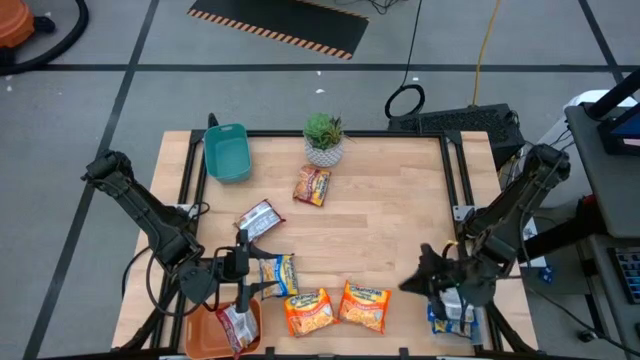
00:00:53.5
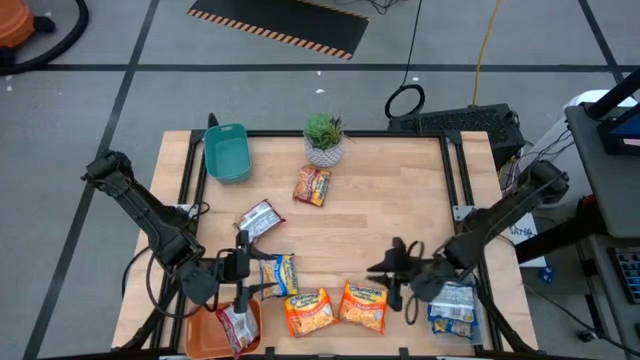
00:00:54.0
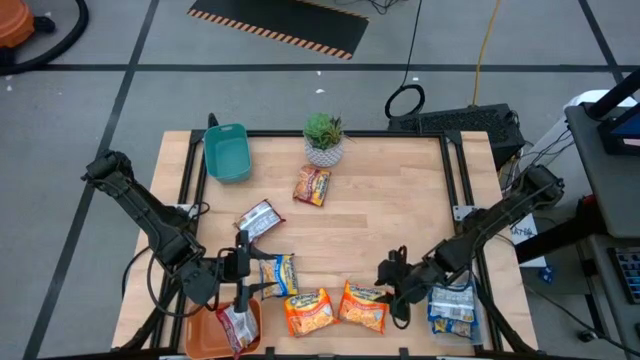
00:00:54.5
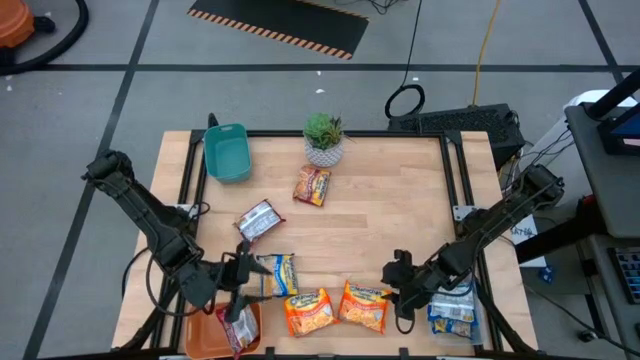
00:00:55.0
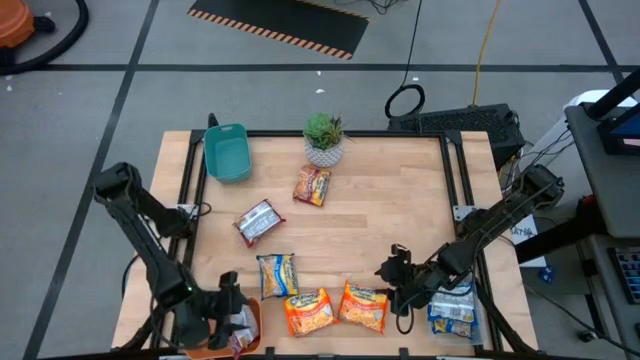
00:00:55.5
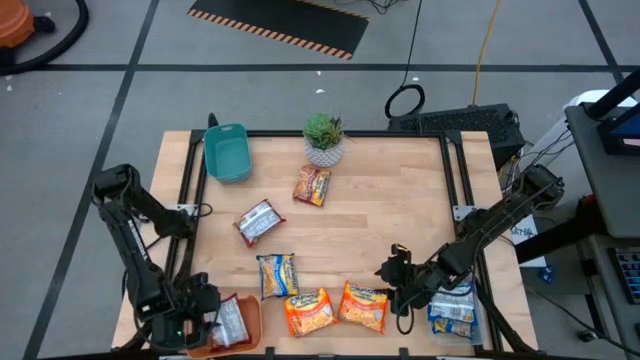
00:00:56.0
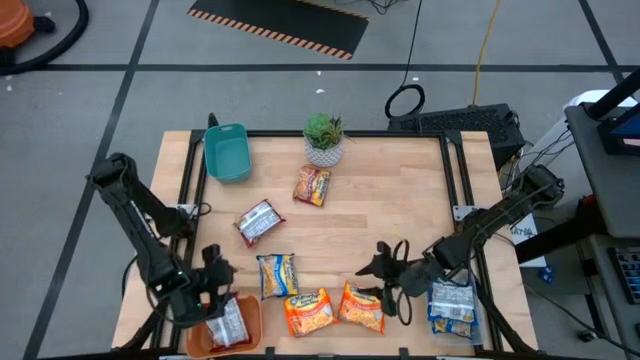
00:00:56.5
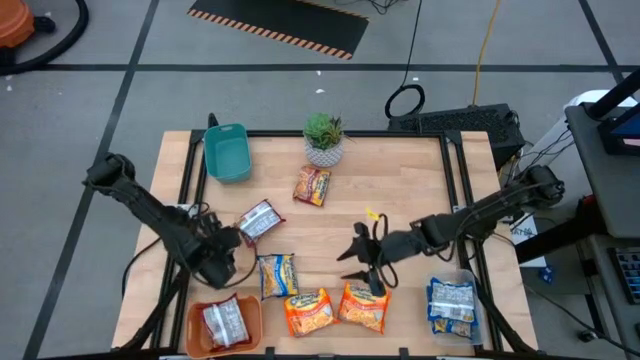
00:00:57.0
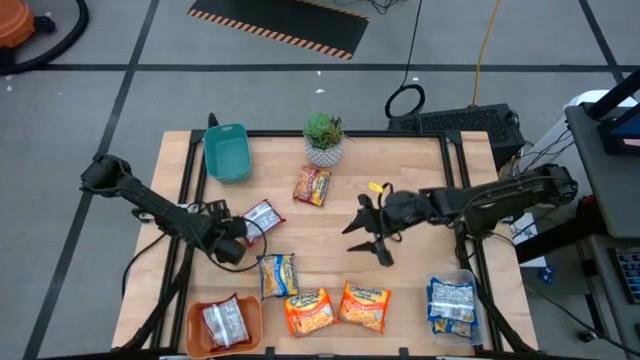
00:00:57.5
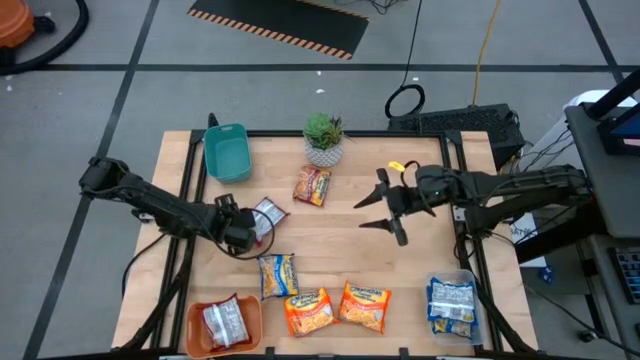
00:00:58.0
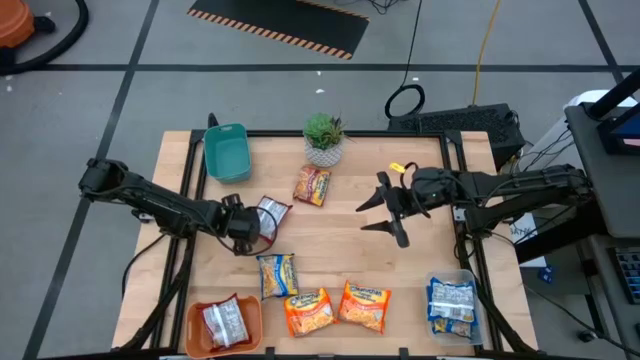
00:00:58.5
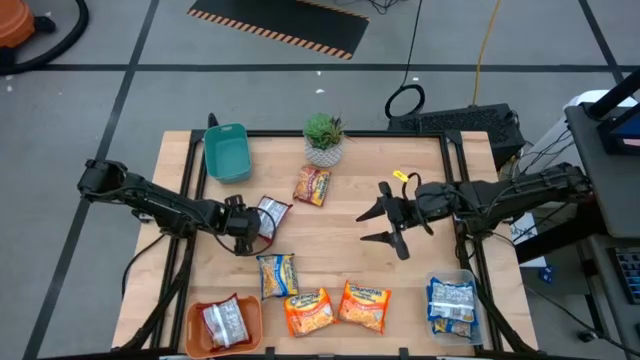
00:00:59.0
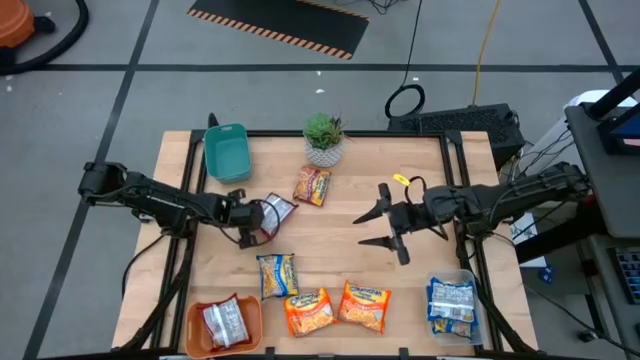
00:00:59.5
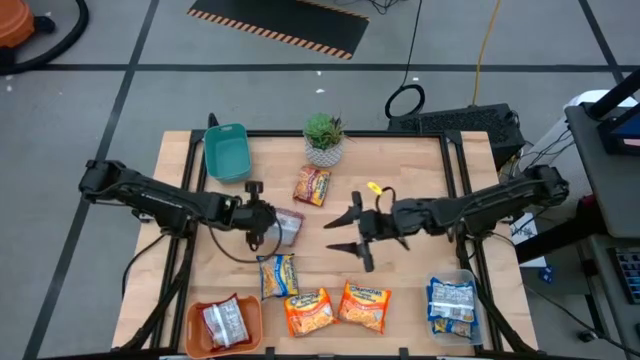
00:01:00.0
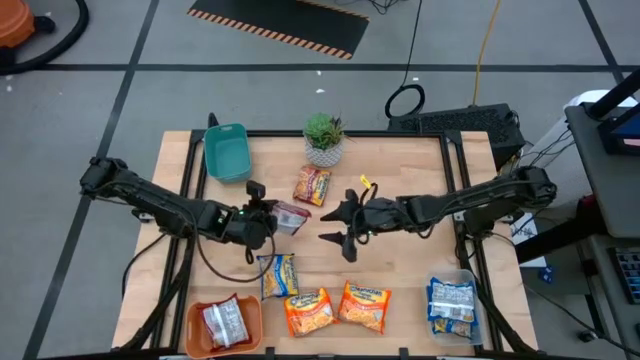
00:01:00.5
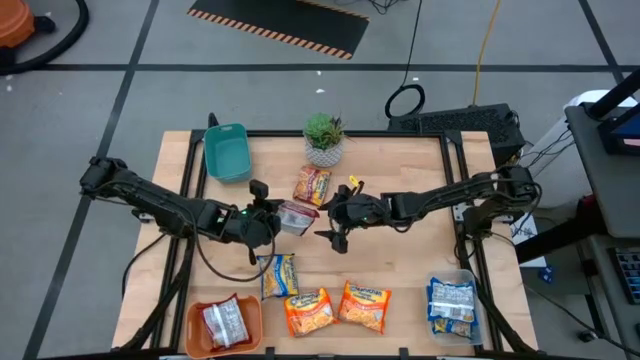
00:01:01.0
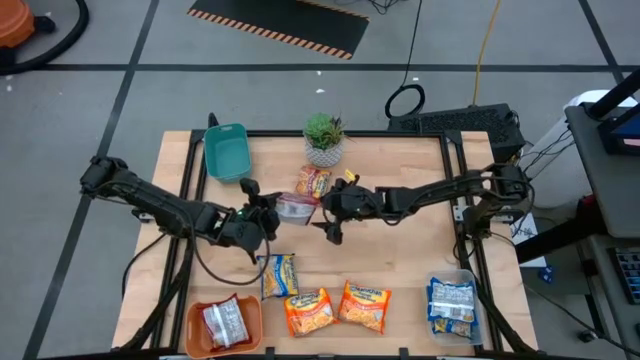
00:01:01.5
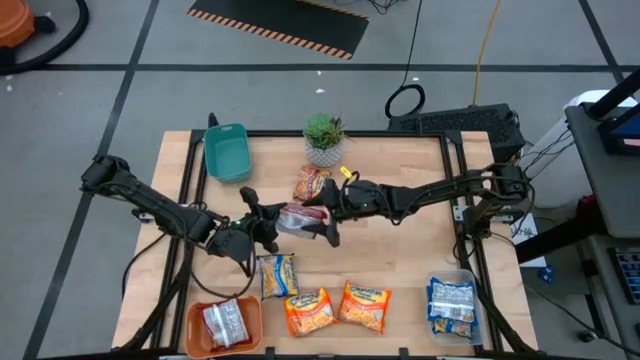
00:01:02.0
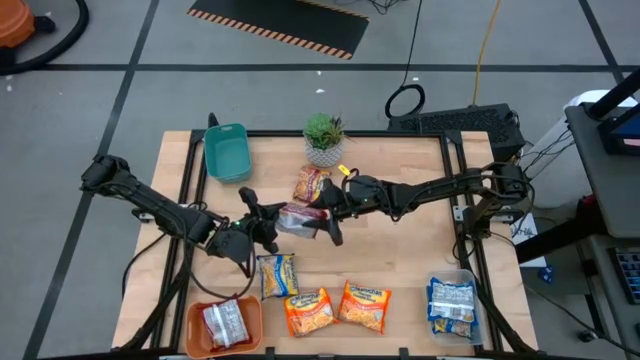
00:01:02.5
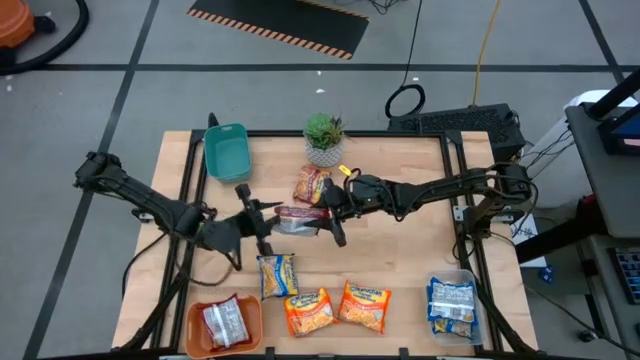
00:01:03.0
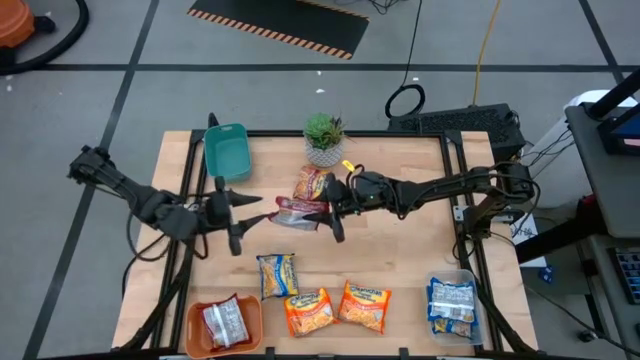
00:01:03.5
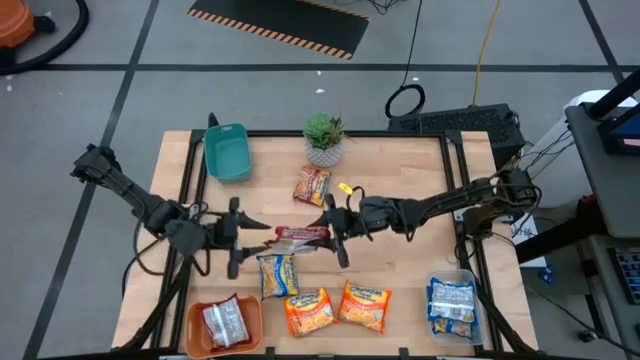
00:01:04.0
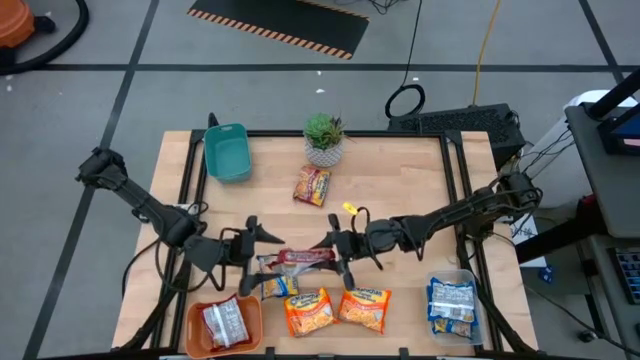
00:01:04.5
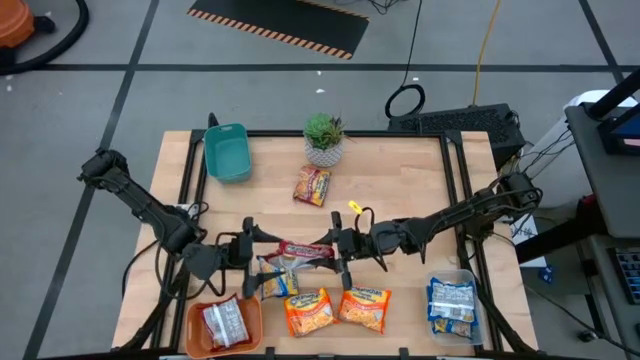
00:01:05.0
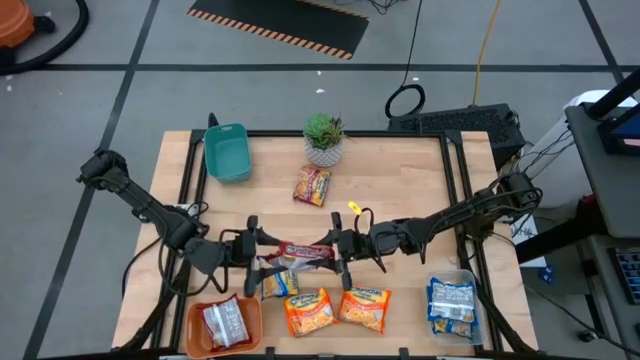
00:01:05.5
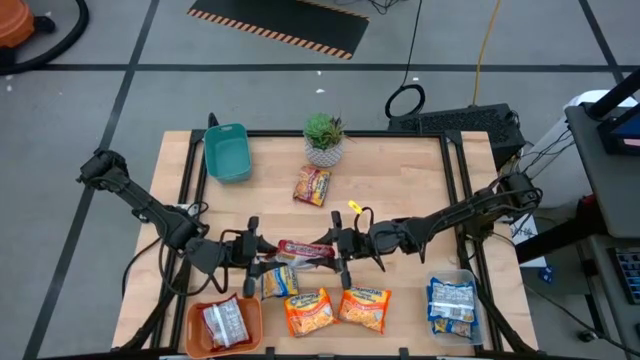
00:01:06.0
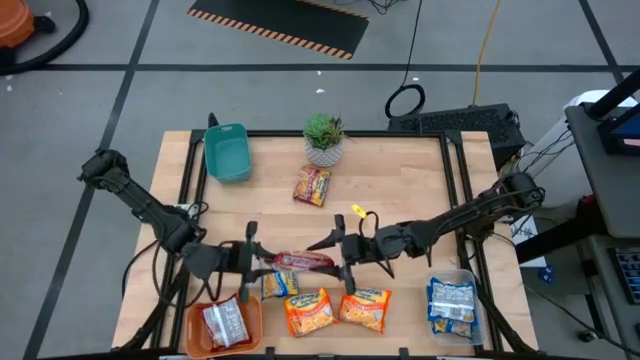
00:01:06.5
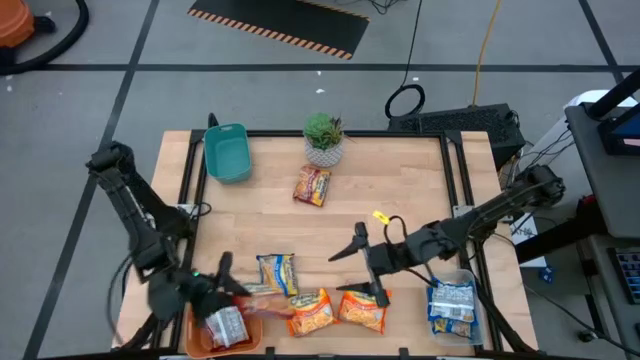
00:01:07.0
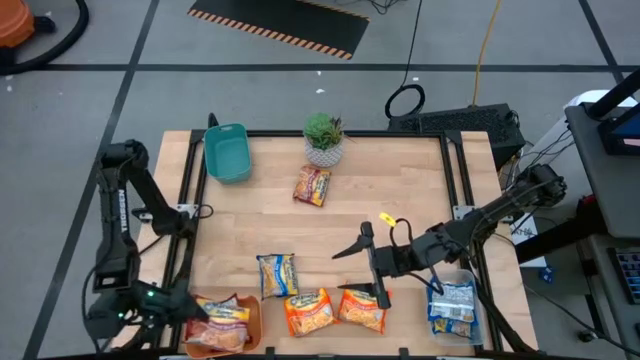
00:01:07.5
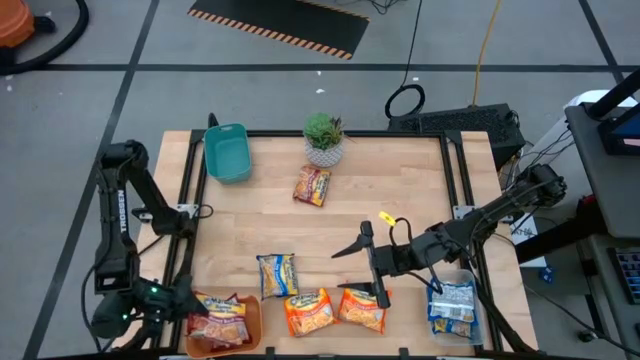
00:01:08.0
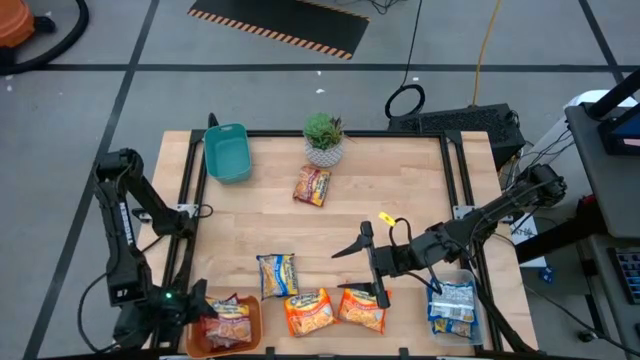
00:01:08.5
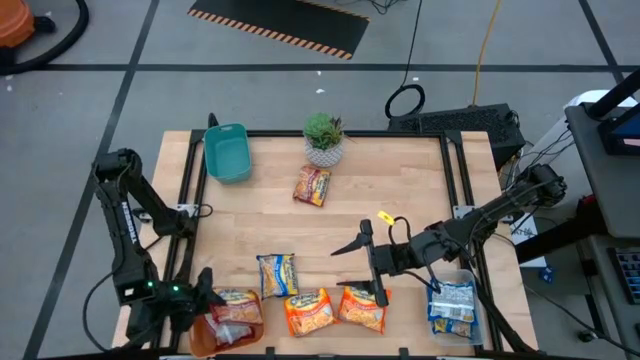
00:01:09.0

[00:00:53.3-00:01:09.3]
Task: Sort Maruchan noodles
Put the left red noodle pack into the orange bin

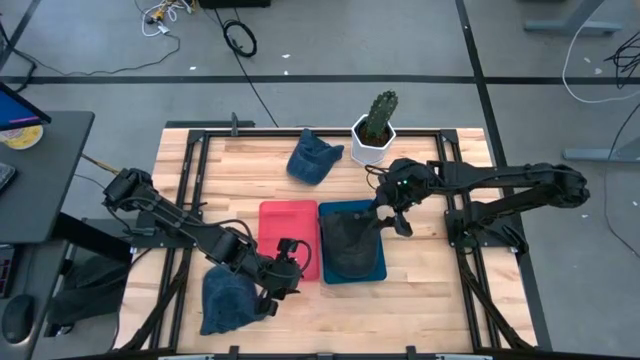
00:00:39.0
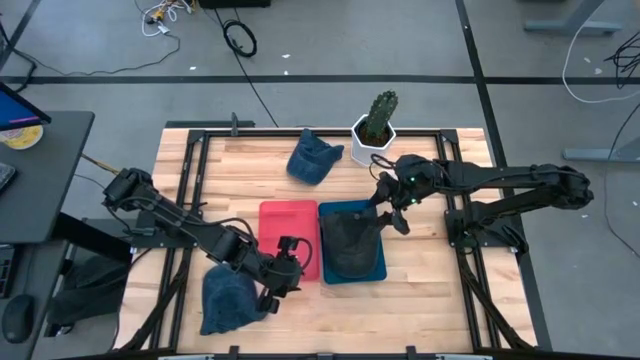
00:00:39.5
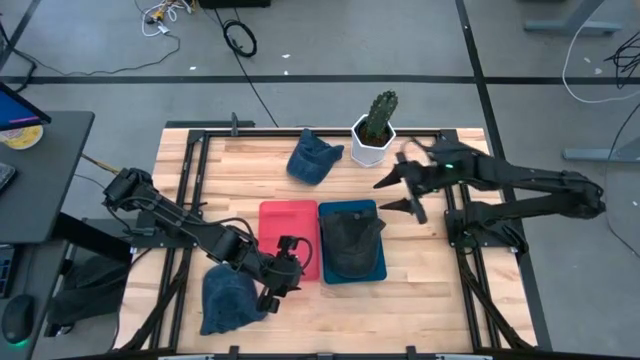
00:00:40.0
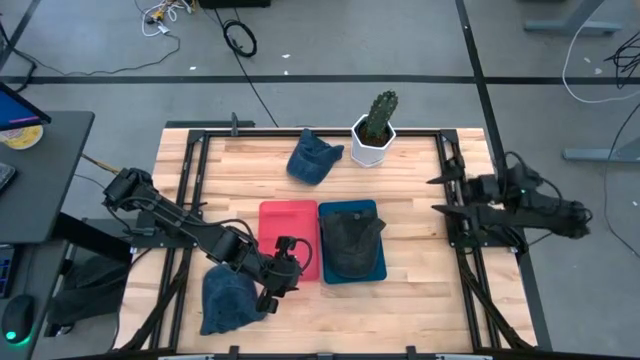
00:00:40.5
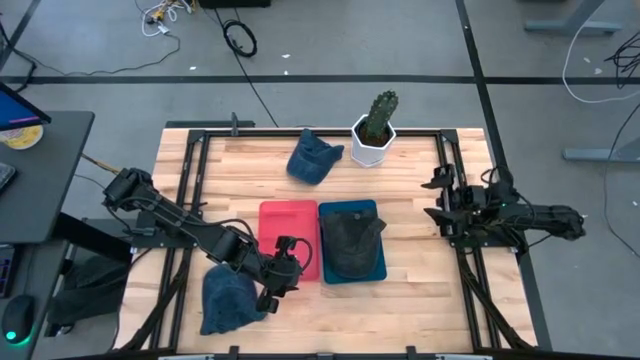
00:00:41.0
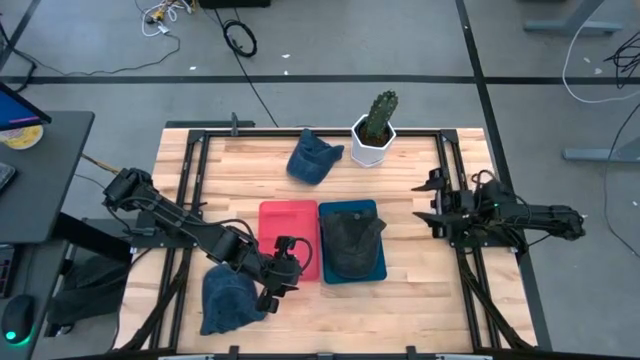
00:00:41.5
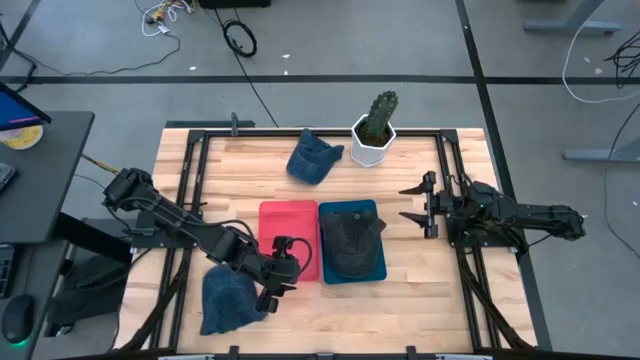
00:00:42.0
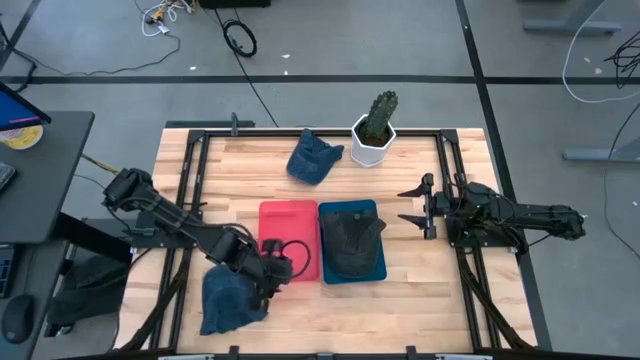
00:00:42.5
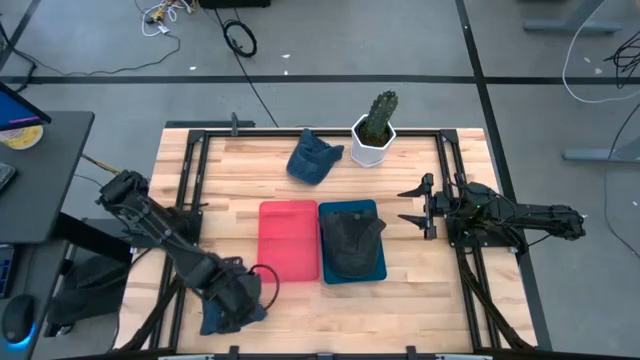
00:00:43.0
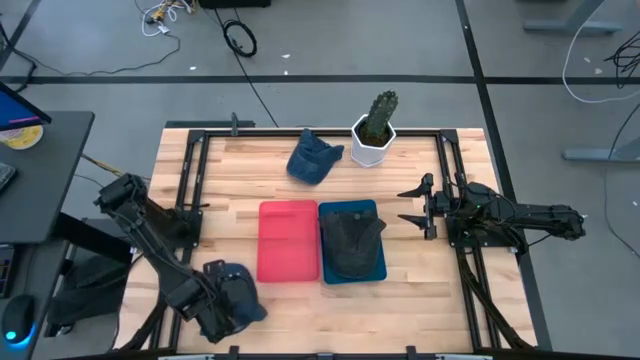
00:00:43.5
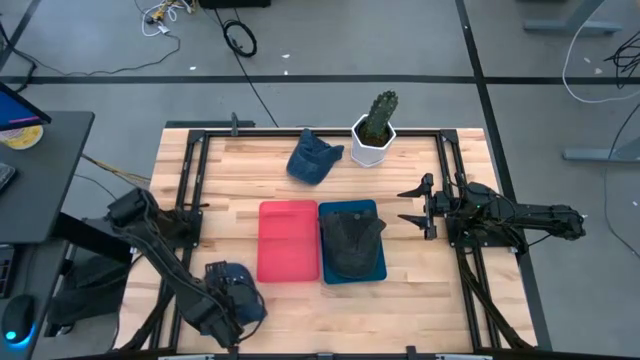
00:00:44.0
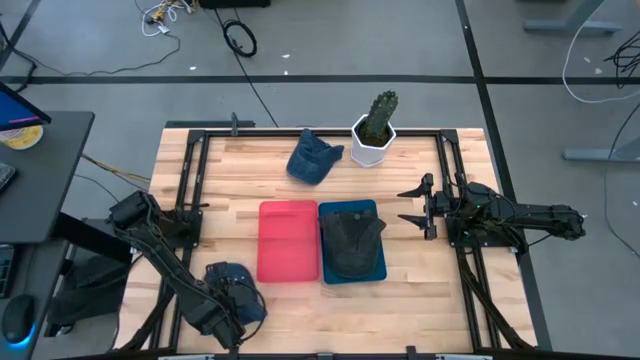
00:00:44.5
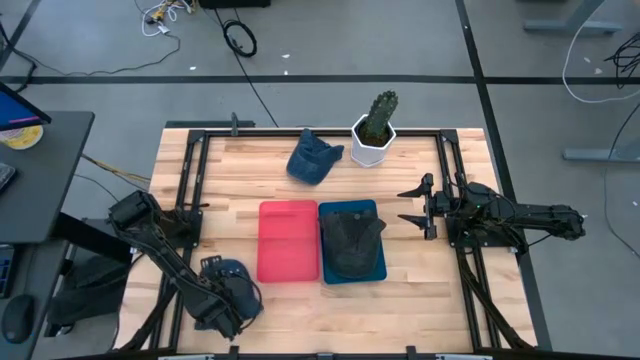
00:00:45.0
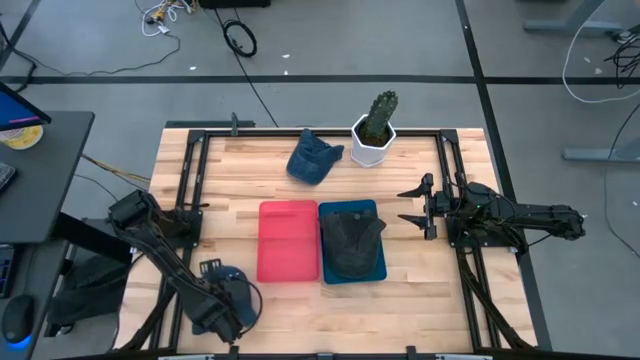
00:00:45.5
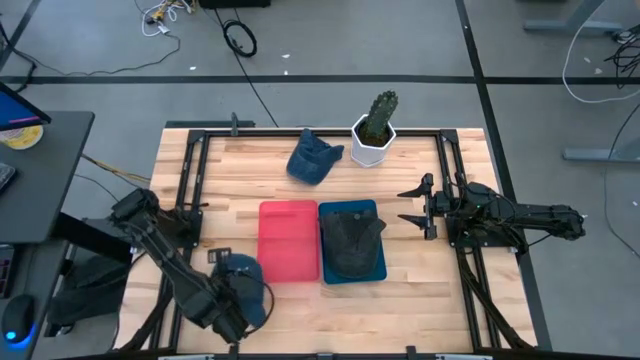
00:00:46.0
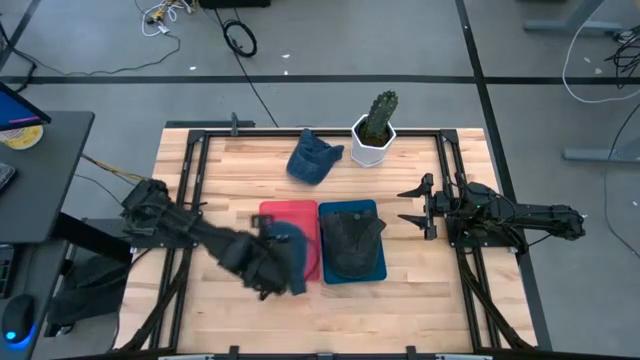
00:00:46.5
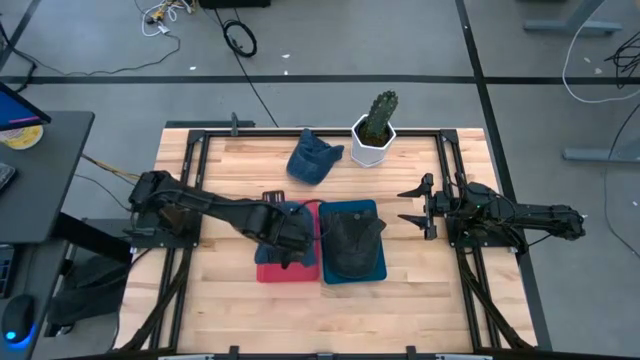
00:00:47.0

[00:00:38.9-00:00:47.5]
Task: Pick & Place hat
Put the bottom dark blue cap into the red bin
